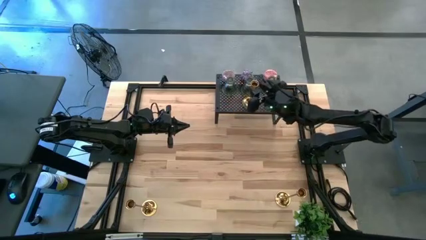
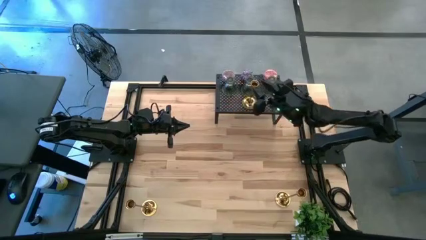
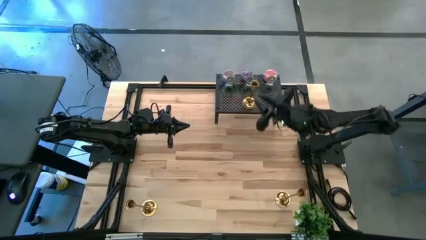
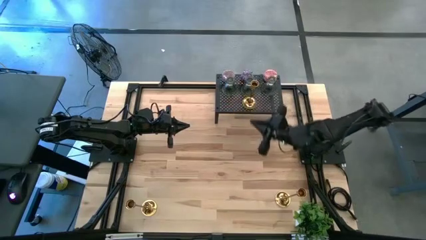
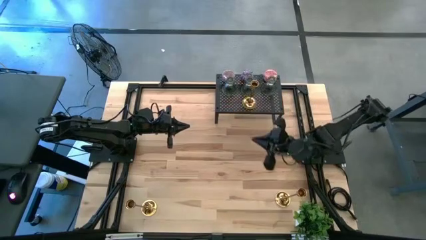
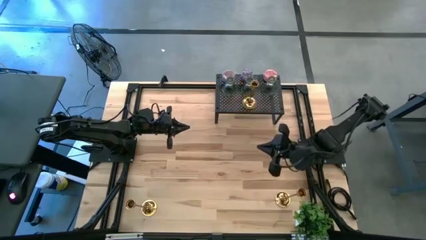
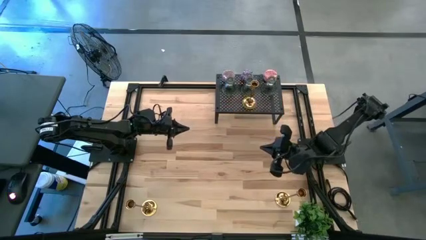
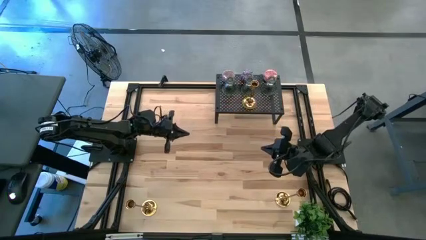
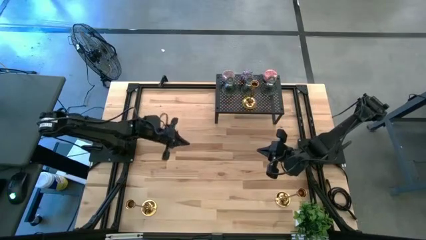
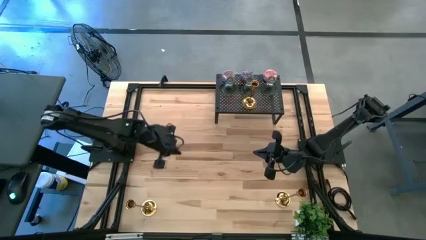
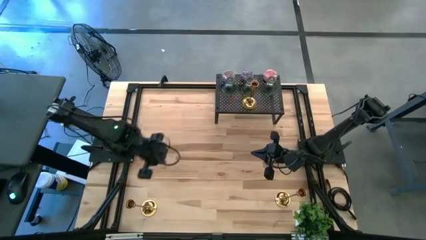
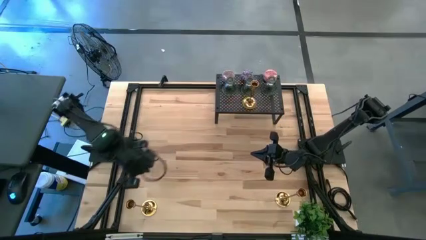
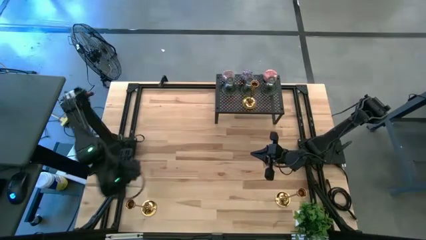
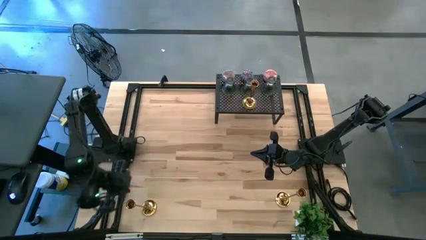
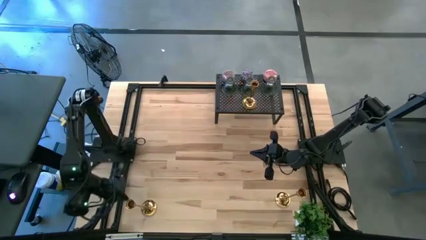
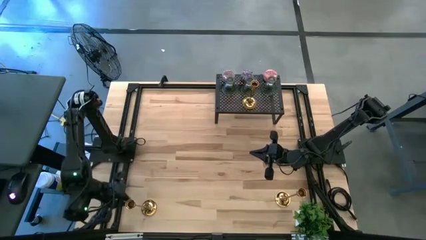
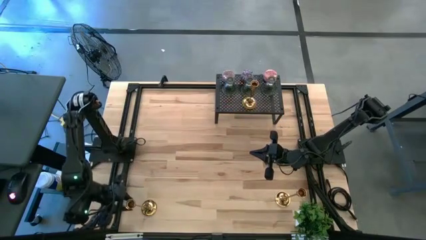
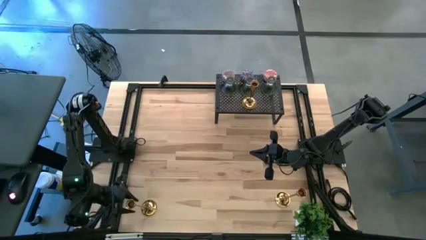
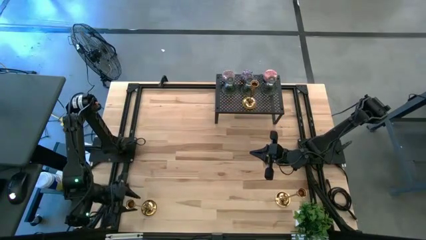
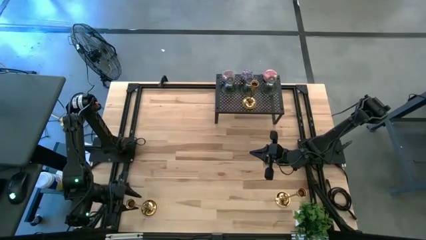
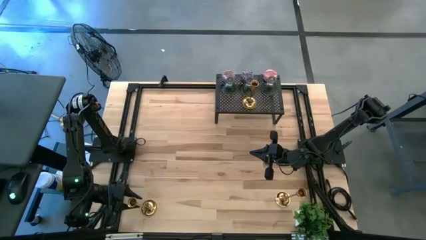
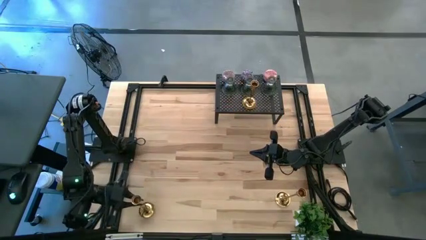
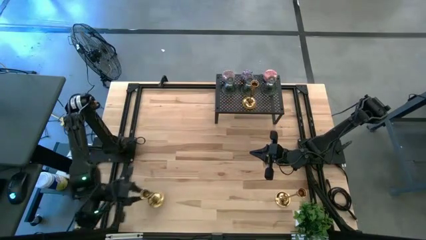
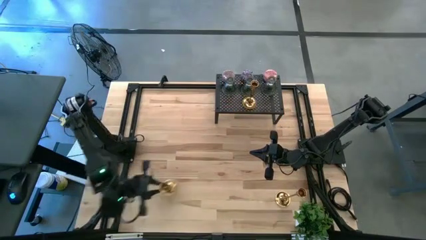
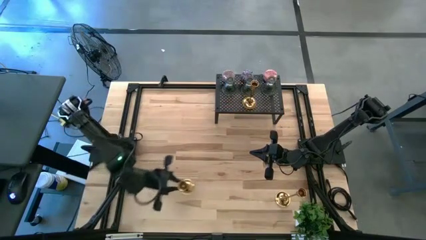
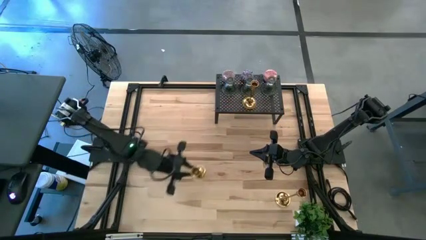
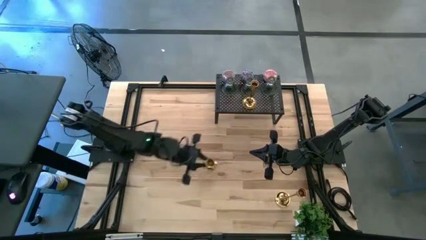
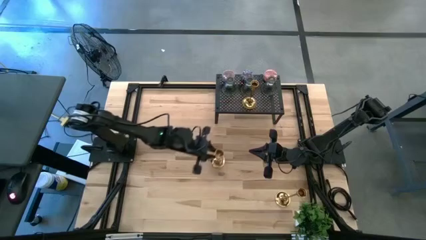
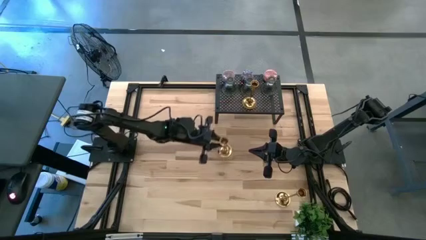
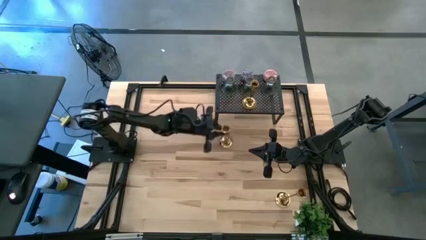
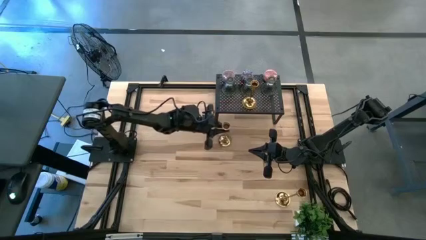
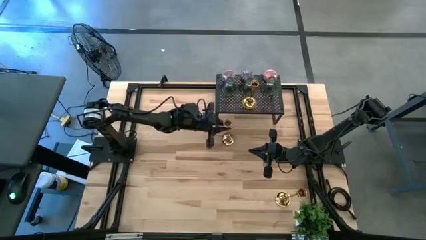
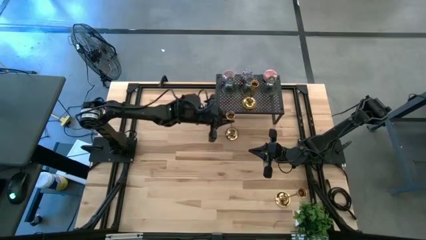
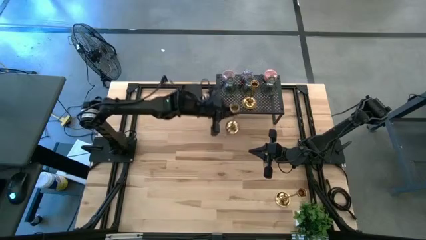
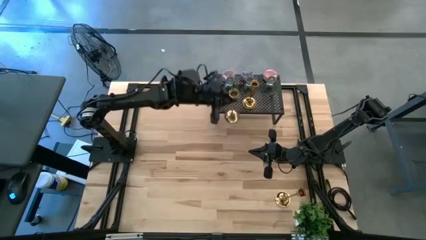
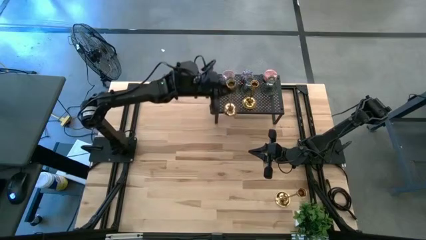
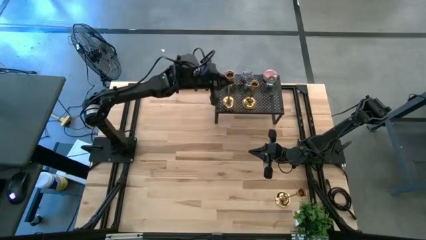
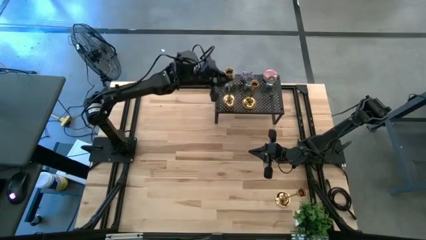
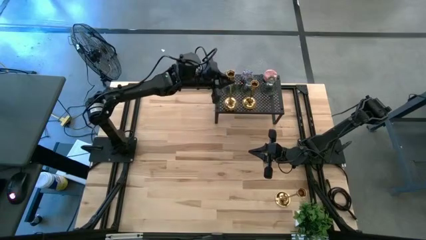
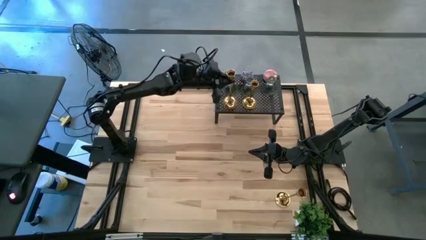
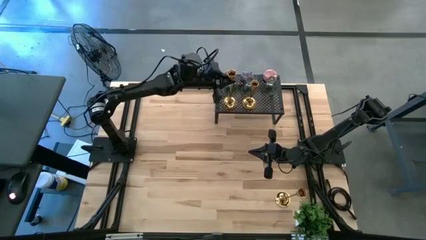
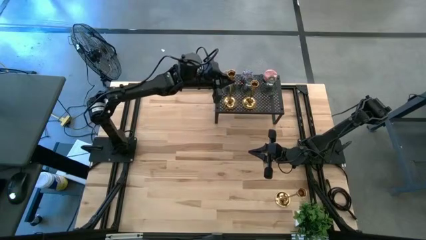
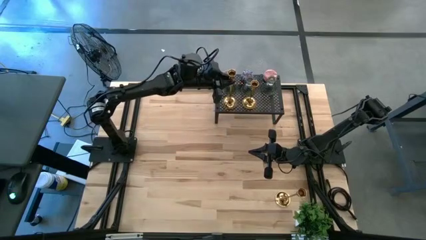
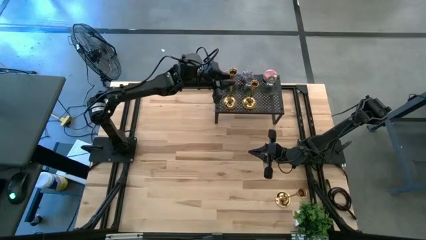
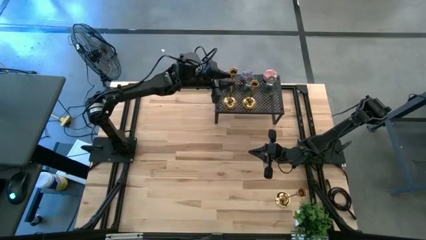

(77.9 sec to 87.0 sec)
Task: Pick & Place candle stick holders
Put the left metal candle holder on the shelf

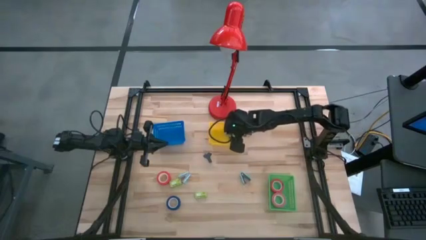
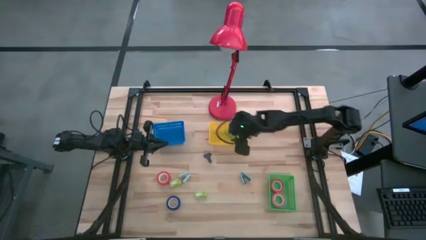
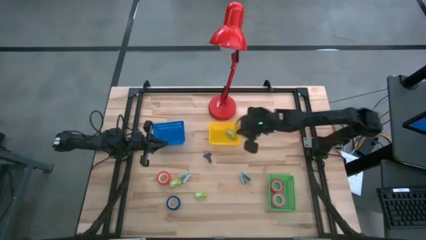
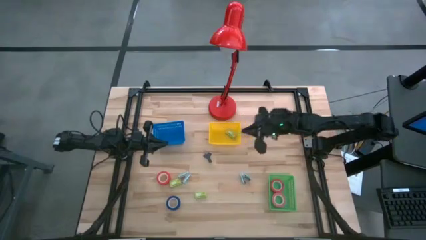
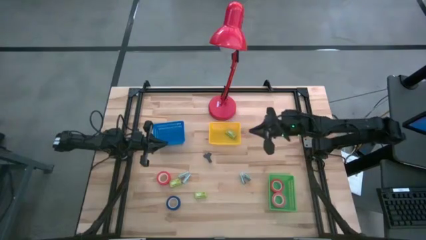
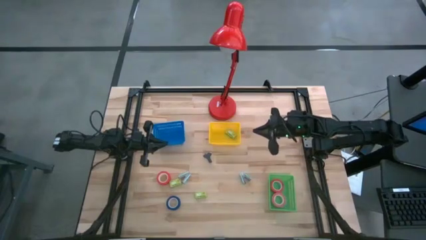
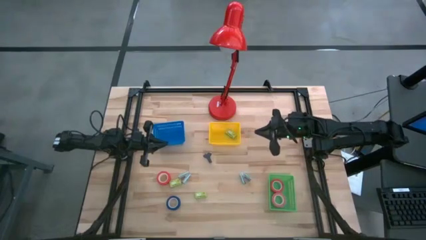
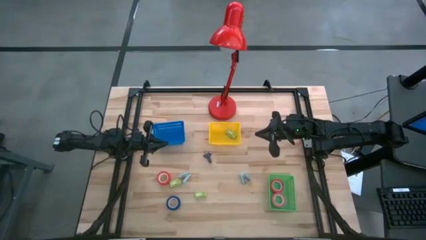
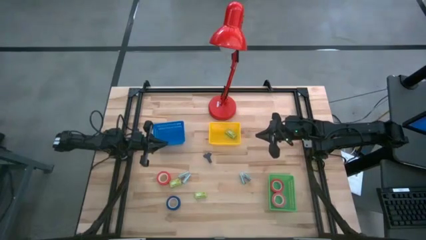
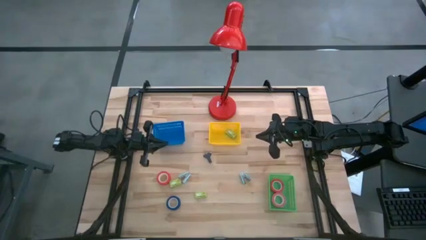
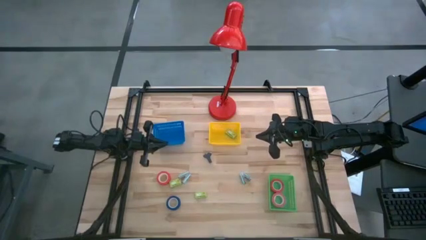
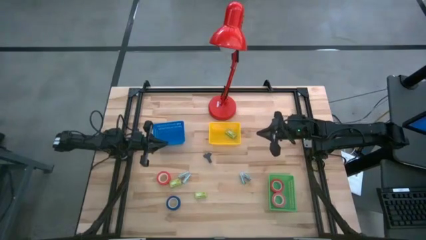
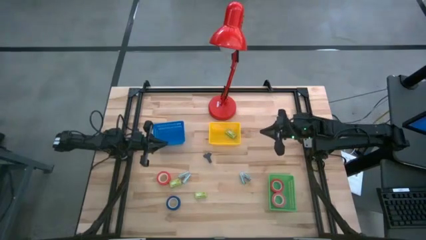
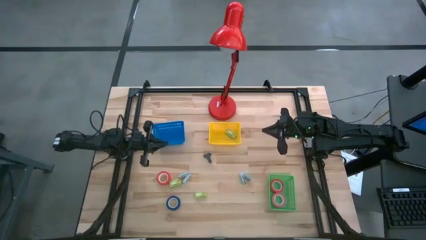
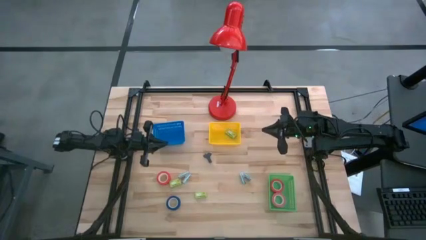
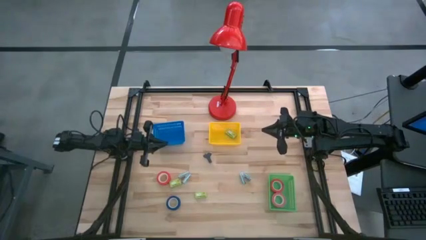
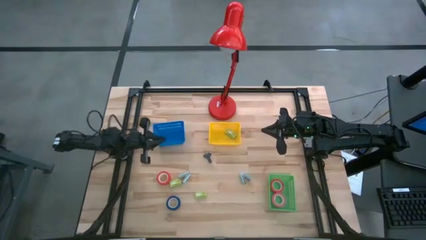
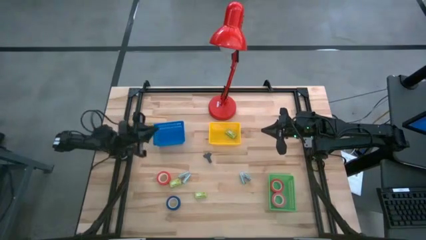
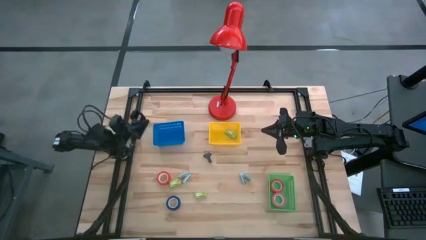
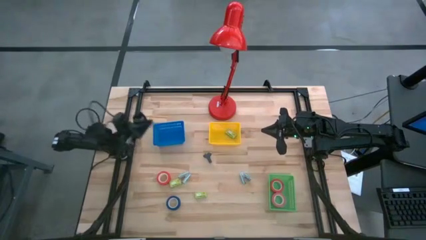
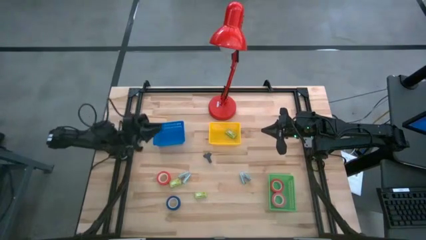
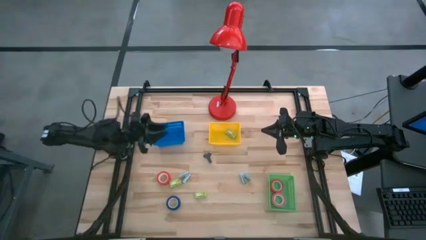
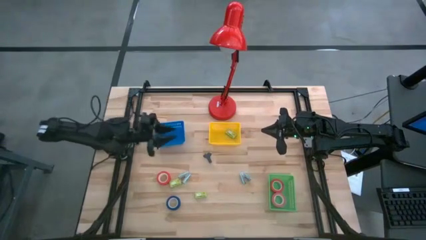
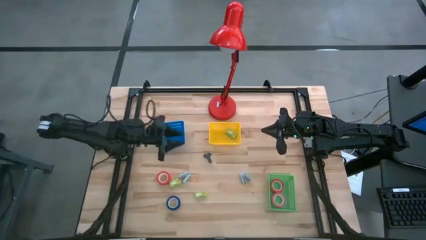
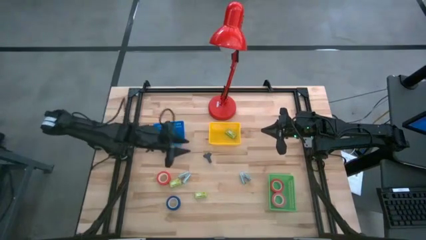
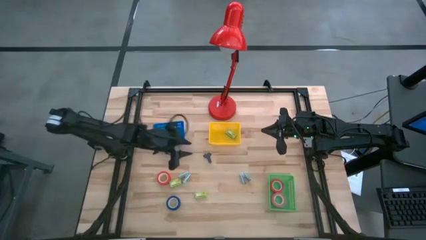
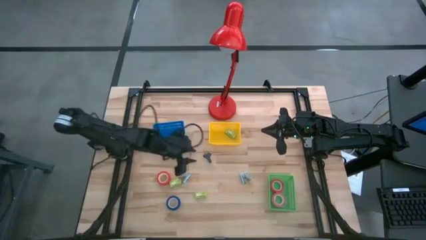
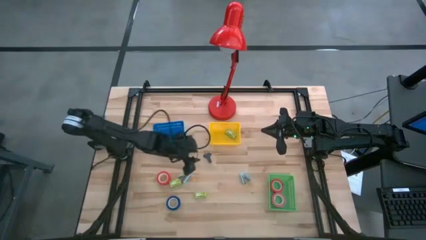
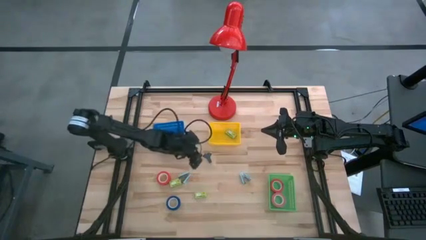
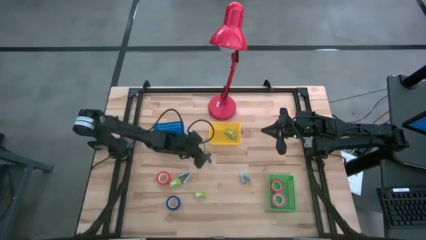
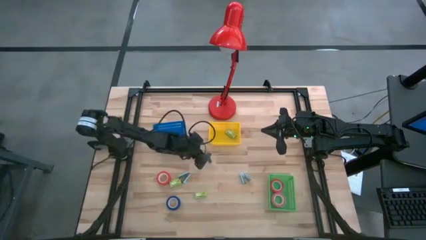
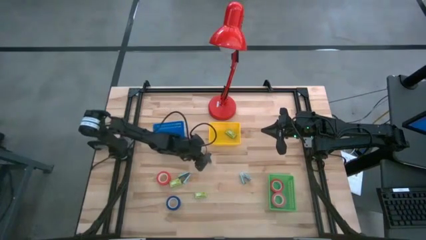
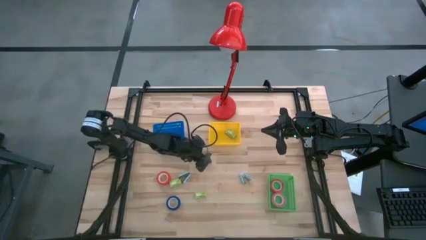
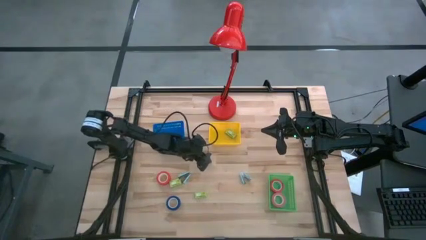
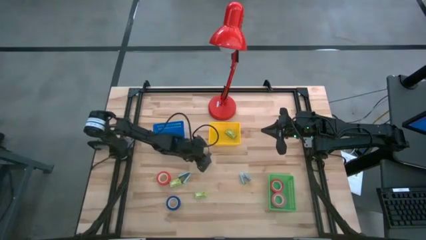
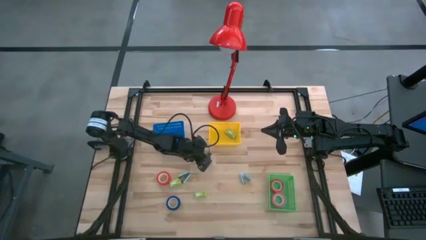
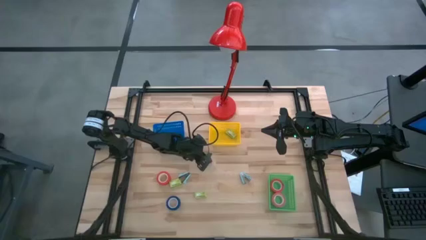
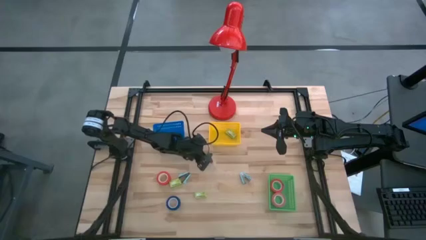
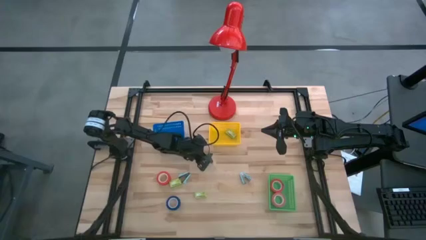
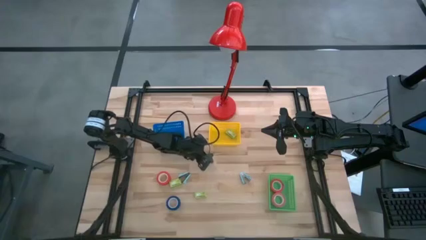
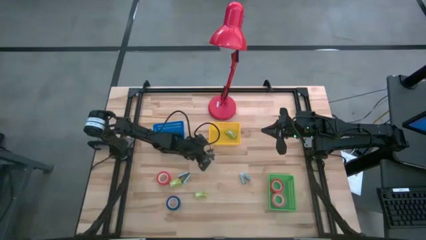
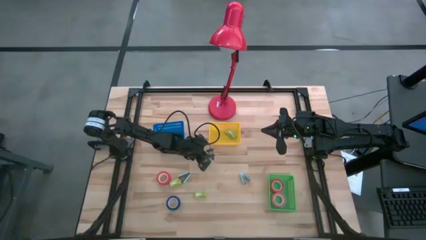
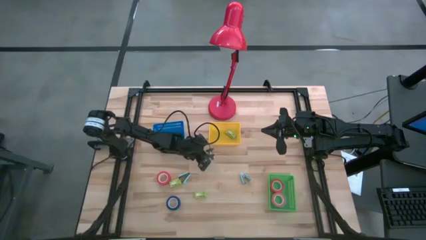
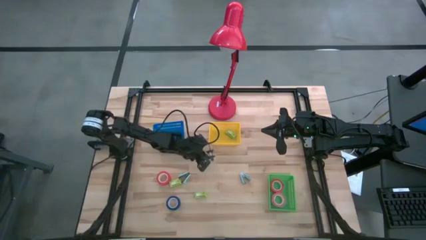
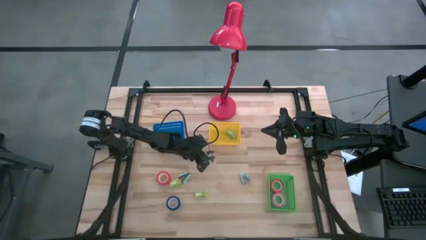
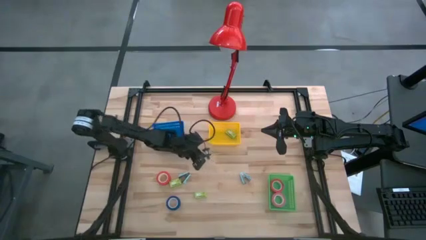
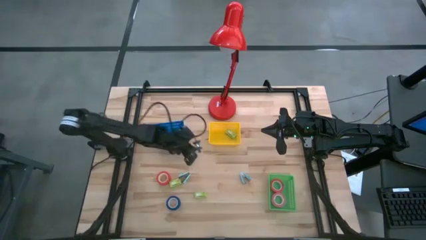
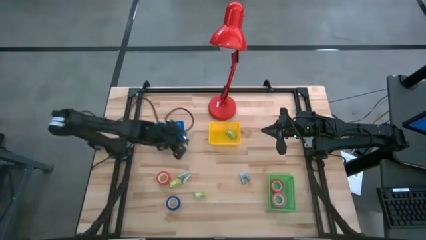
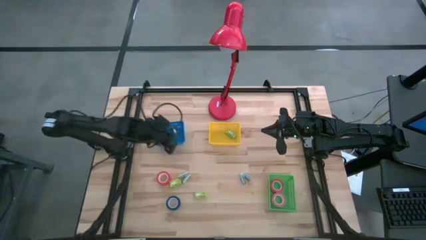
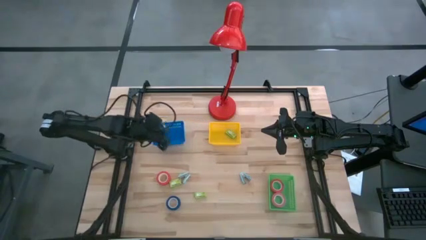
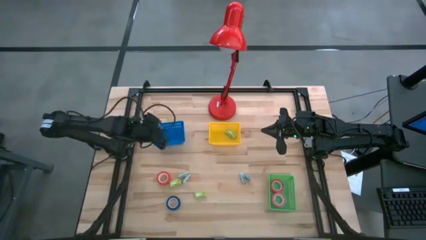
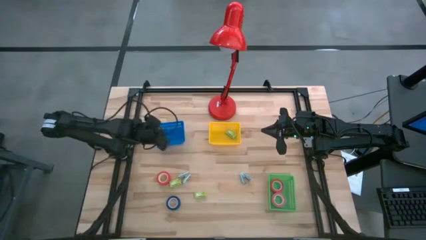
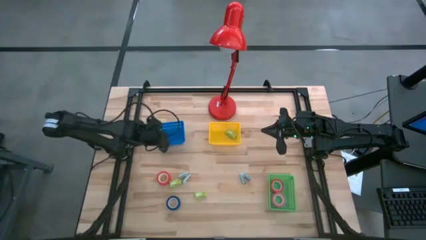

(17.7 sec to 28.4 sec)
Task: Pick and place Stapler, Stapler remover, tape
Put the dark green staple remover into the blue bin
